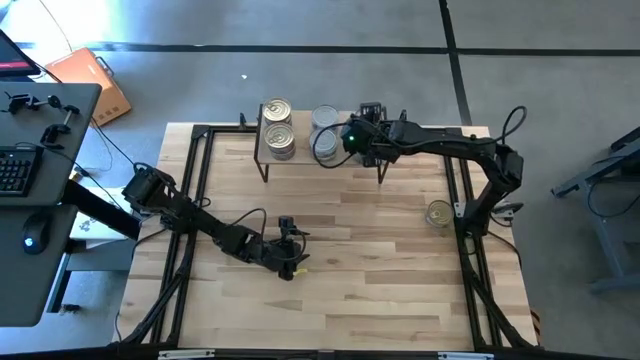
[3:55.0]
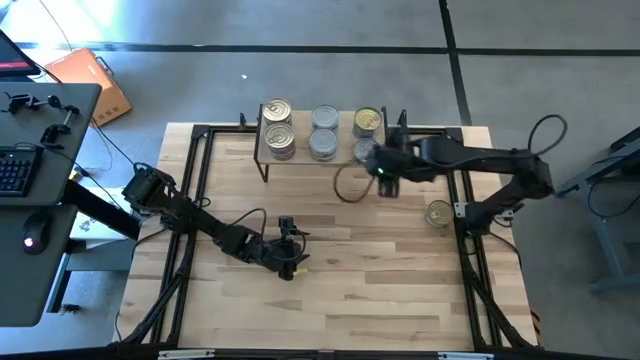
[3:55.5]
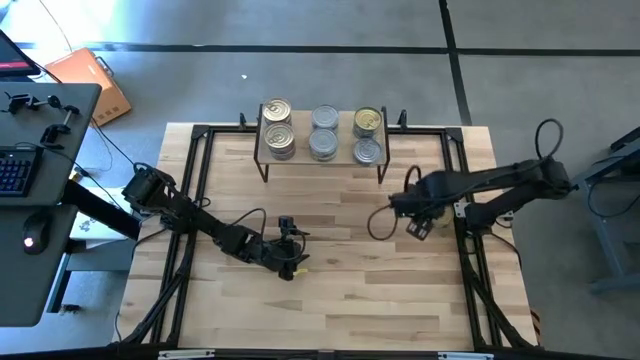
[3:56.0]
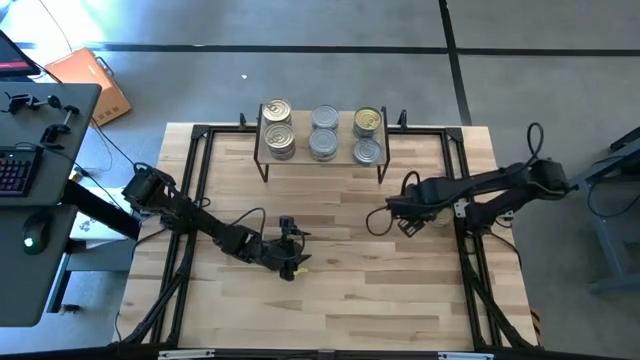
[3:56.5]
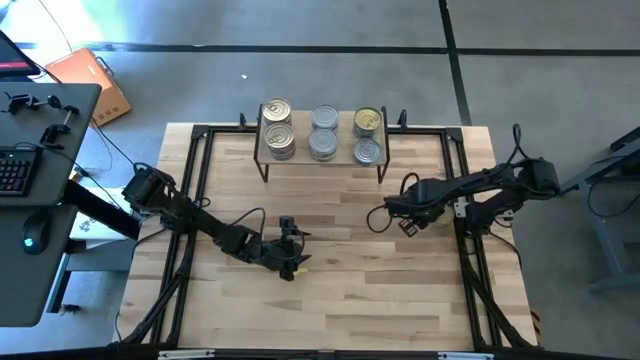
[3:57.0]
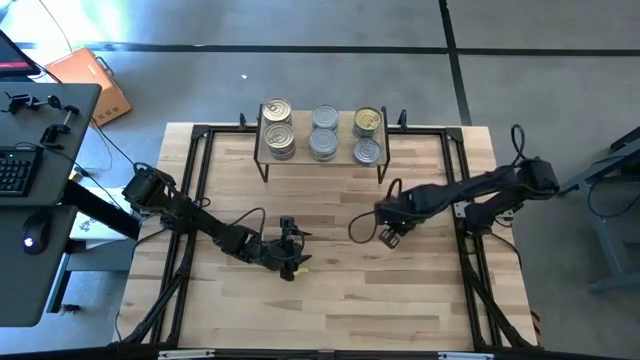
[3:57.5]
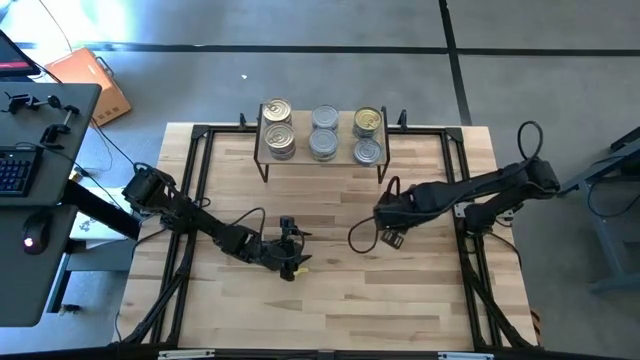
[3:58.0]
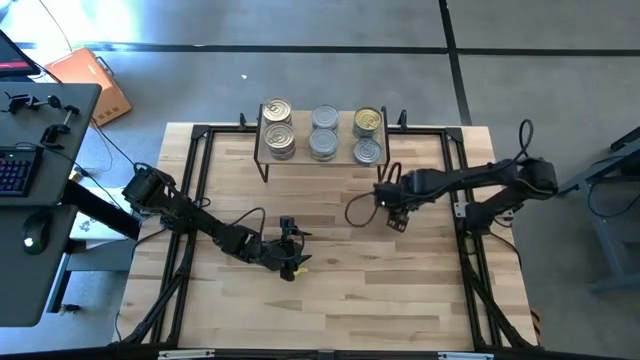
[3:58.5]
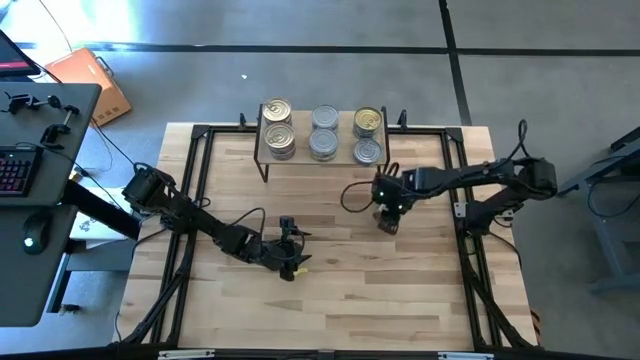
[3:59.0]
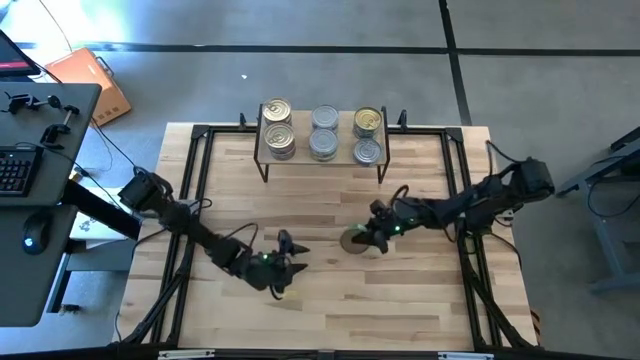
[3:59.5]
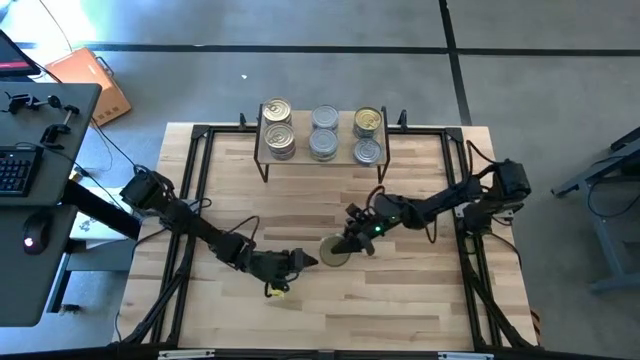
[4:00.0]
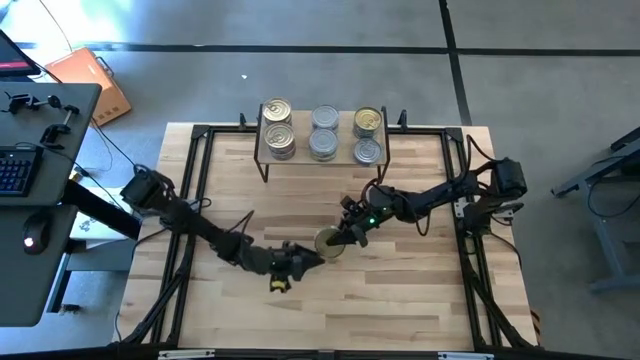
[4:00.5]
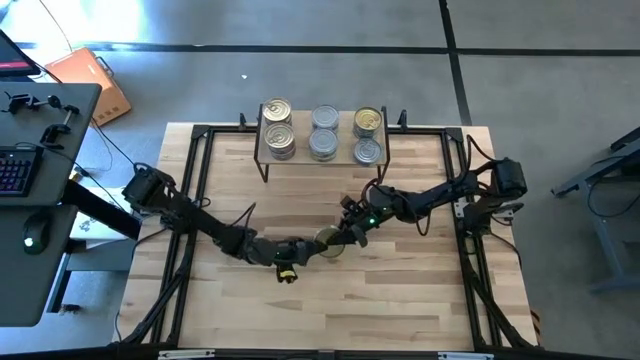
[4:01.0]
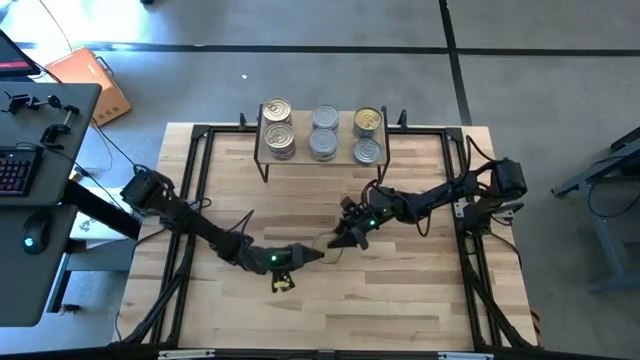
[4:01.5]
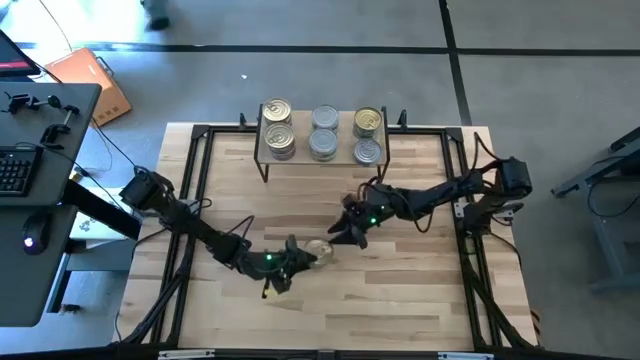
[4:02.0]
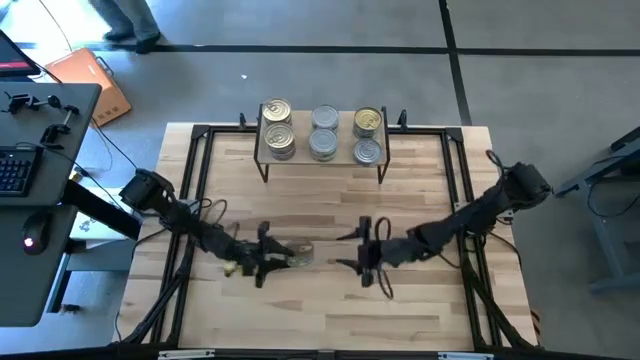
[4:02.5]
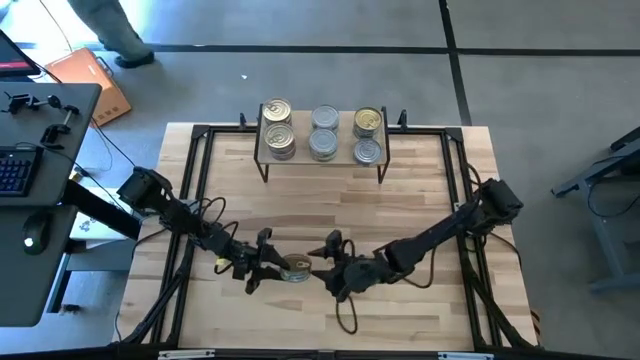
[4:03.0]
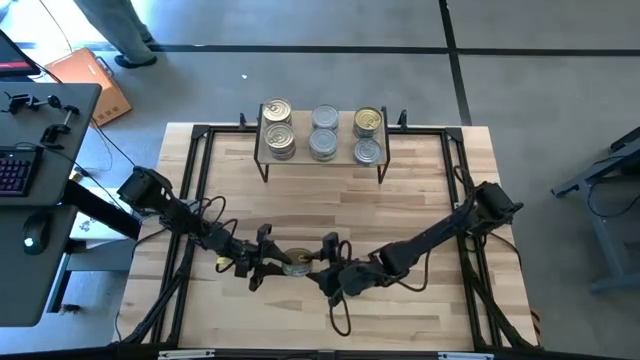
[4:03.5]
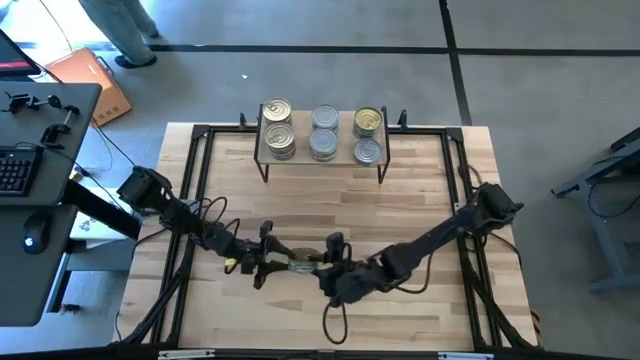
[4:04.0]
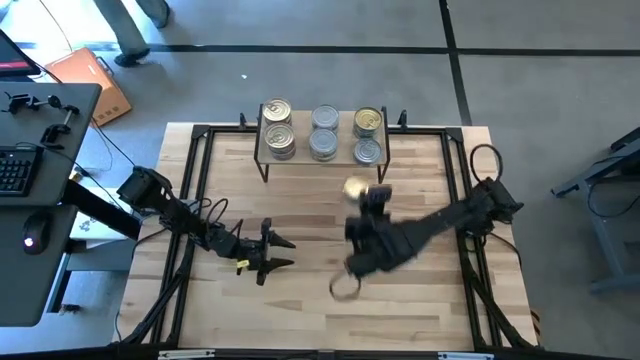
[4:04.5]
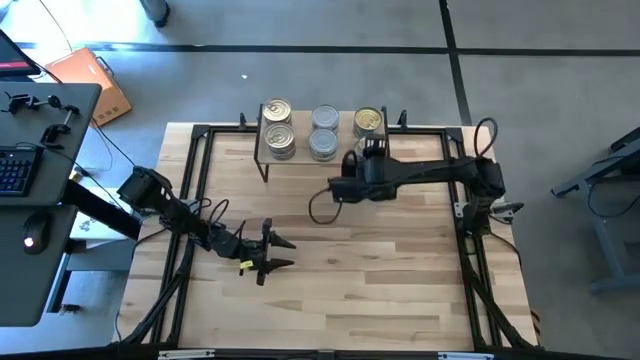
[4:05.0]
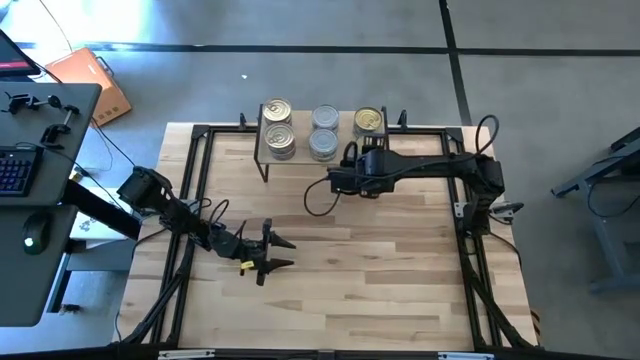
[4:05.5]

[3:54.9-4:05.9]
Task: Stack canned seafood by type on shelf
Stack the green tuna can on top of the green tuna can on the shelf

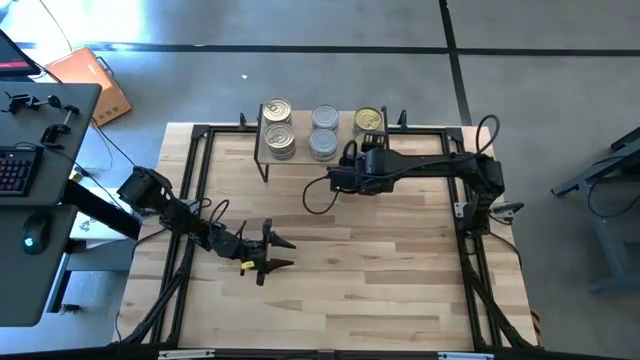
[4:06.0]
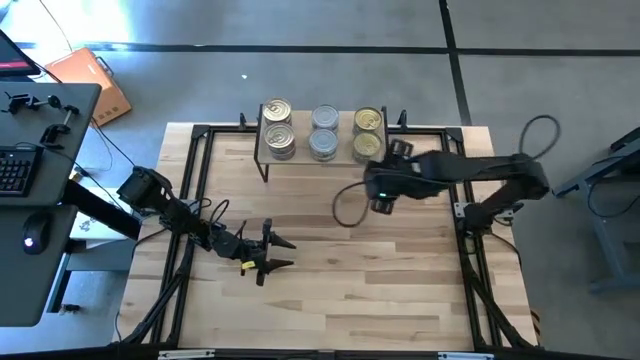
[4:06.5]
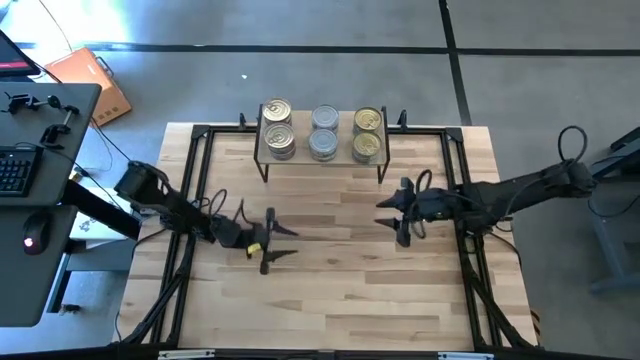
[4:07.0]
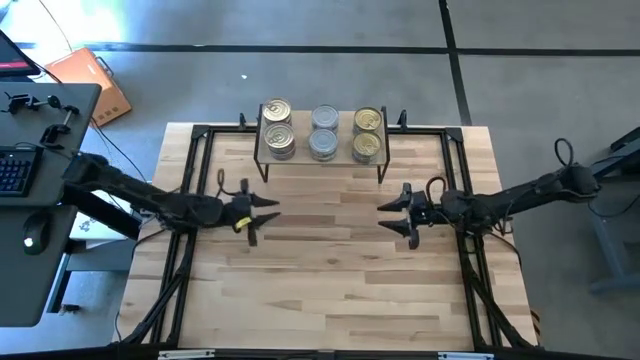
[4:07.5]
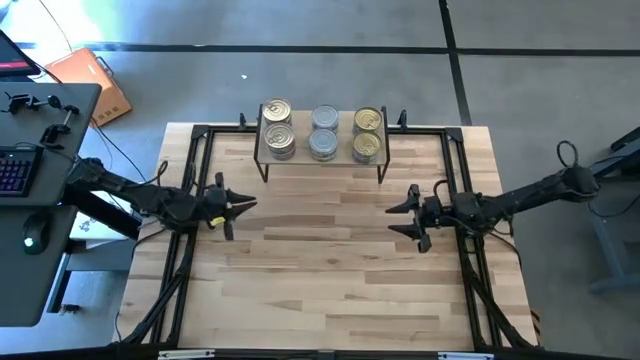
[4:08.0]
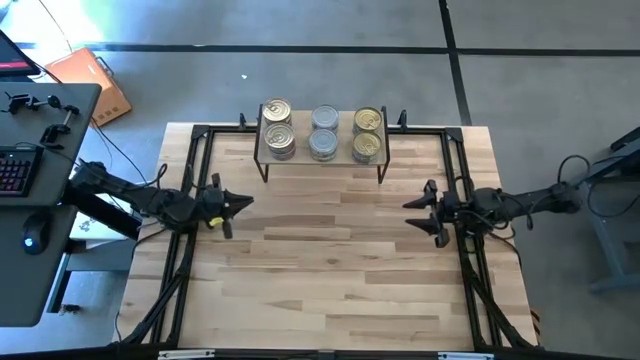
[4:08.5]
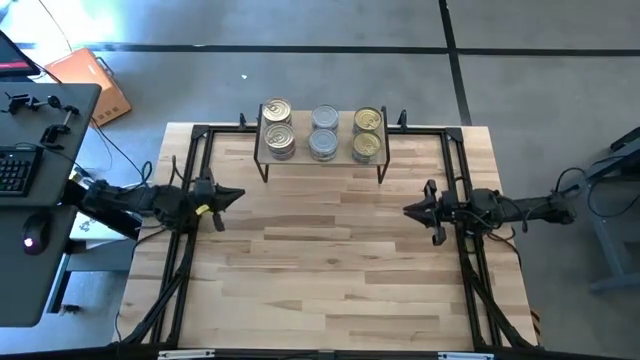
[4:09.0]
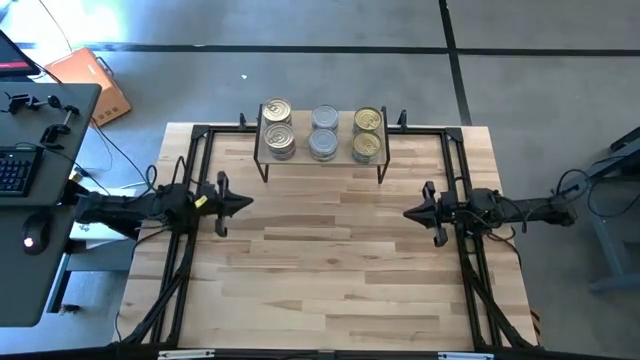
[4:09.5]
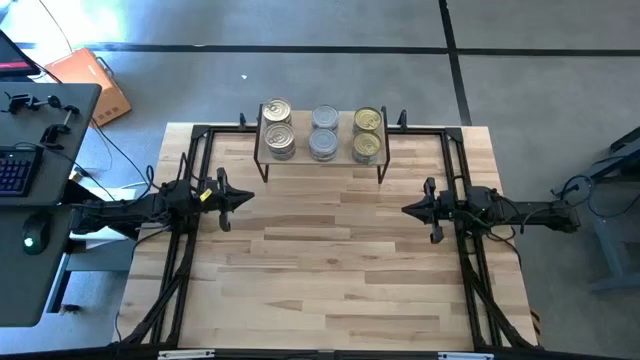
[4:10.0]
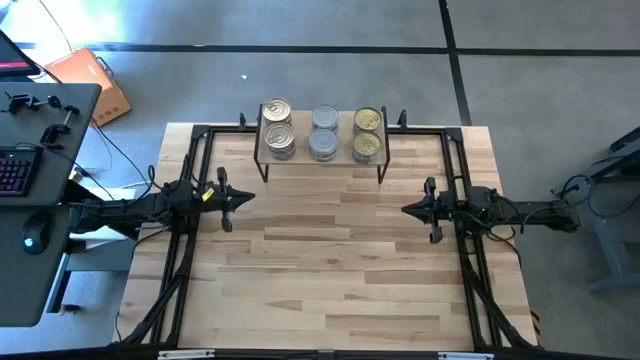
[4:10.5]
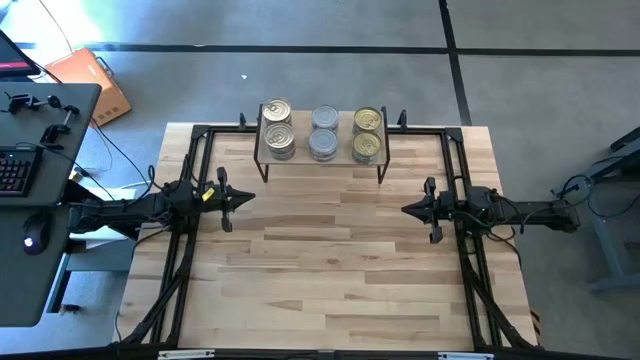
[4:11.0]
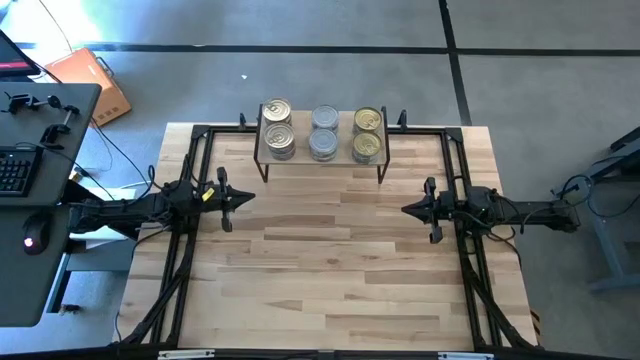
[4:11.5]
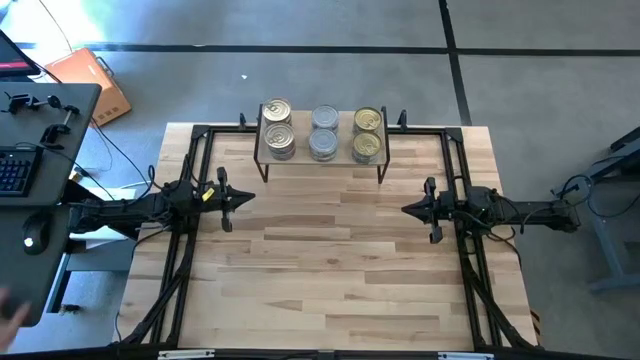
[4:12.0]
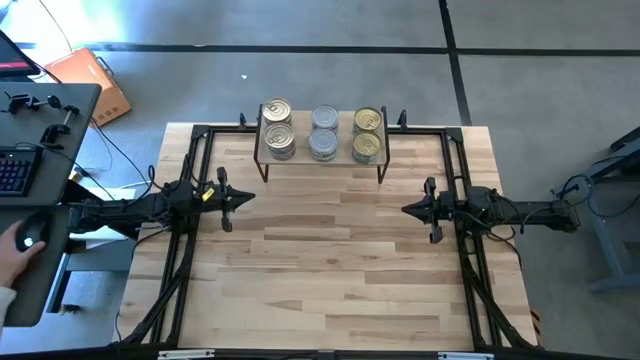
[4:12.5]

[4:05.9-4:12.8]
Return to Home Position

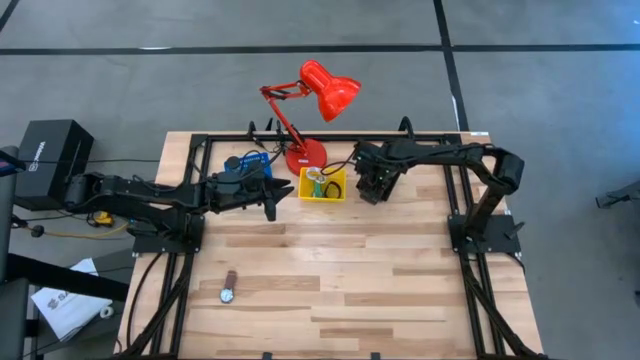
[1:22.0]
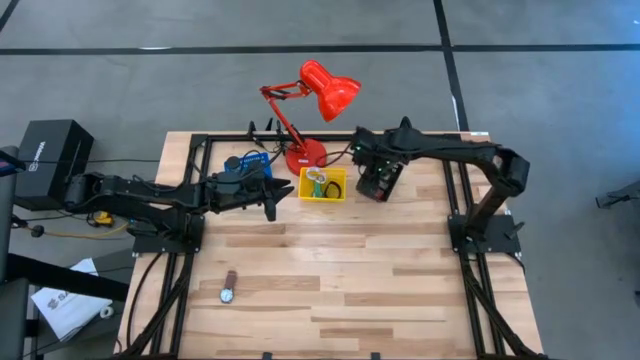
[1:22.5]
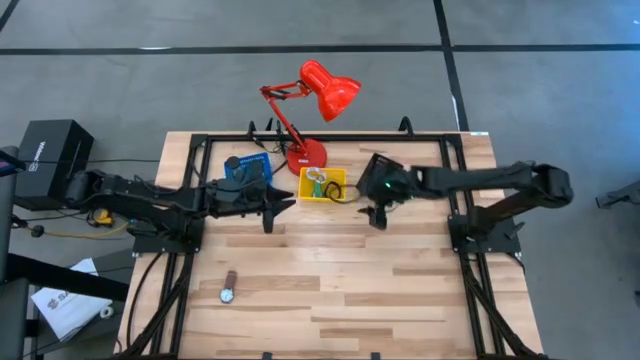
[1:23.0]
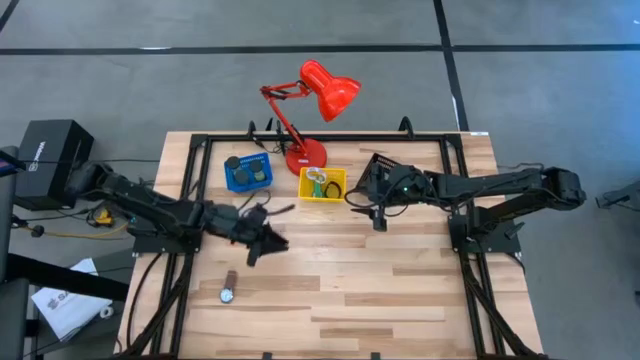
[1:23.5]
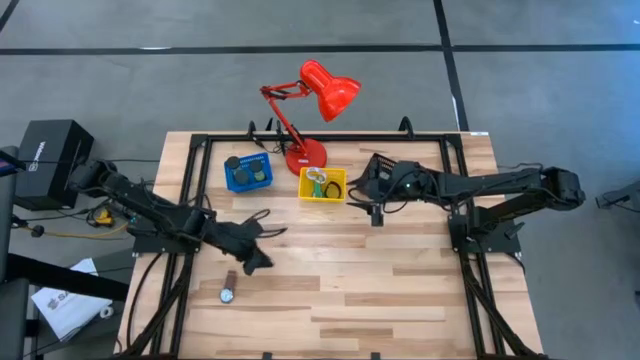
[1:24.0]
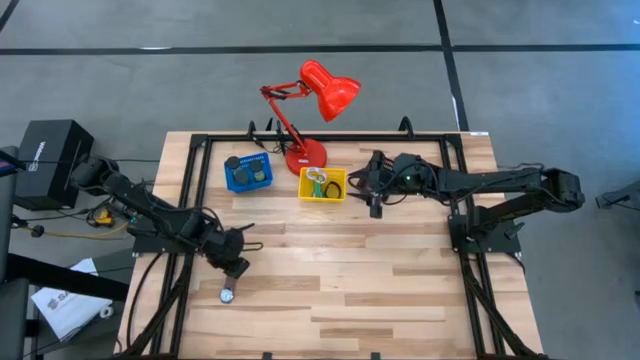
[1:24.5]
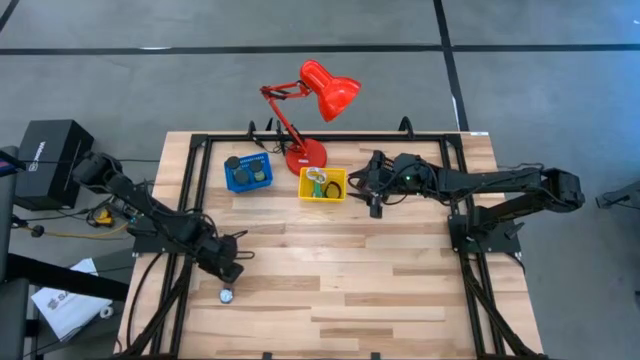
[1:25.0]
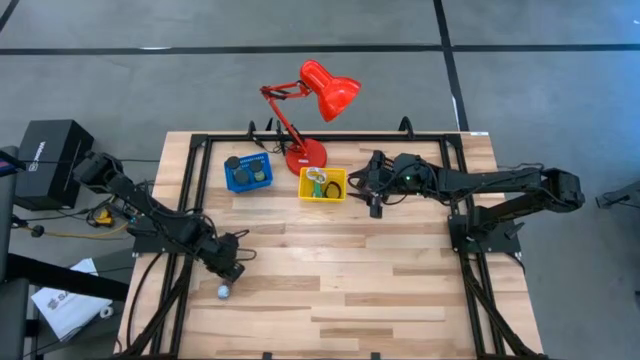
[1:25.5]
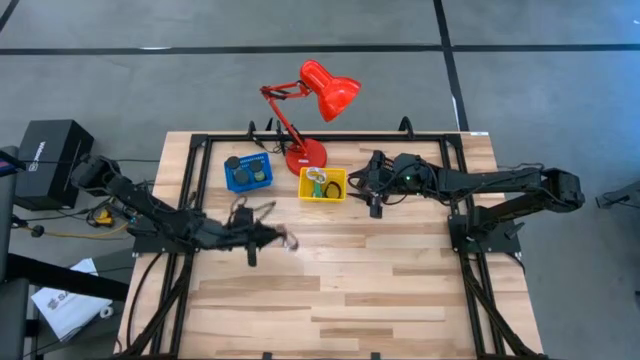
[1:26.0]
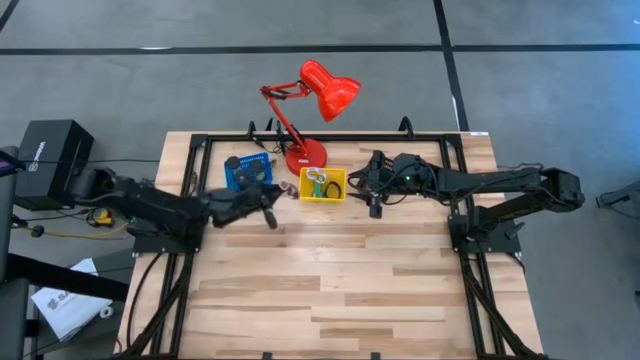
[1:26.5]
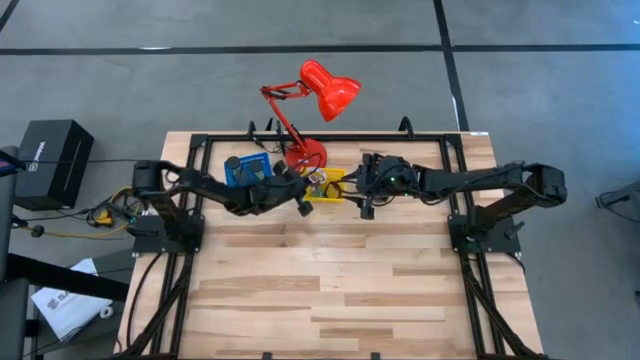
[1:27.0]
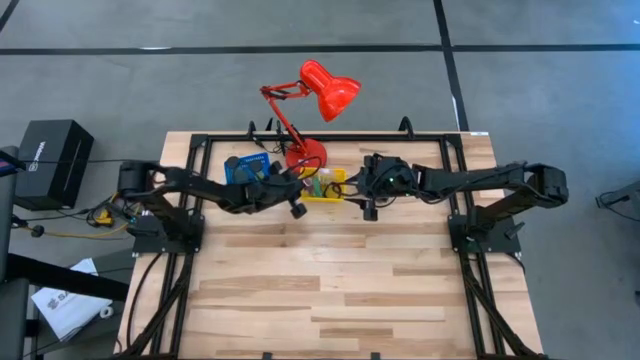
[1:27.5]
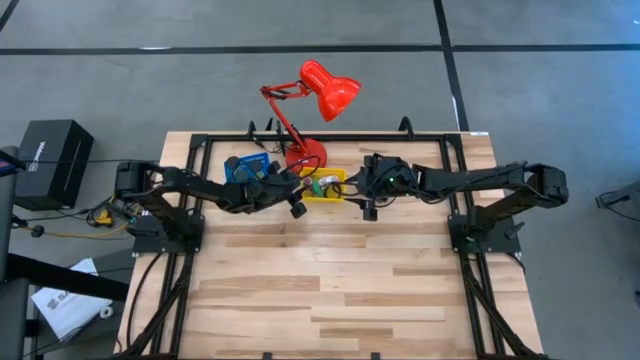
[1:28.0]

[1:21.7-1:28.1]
Task: Pick & Place Office items
Put the brown wrist watch into the yellow bin
